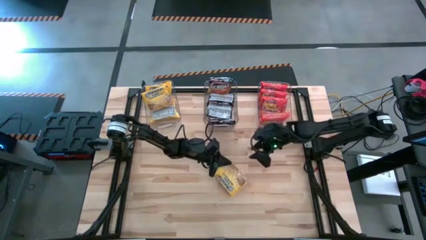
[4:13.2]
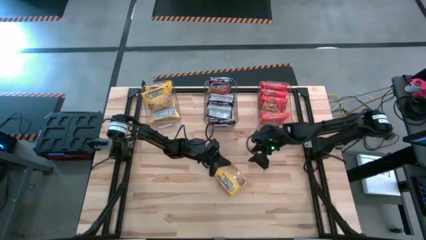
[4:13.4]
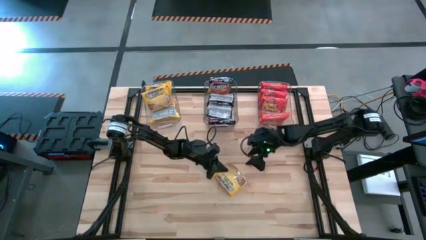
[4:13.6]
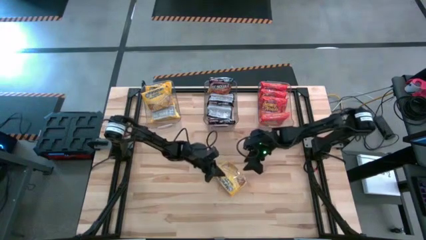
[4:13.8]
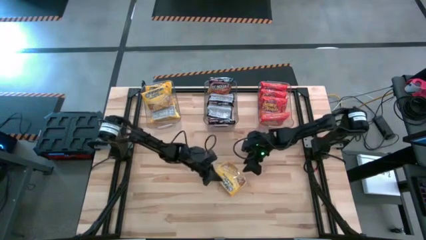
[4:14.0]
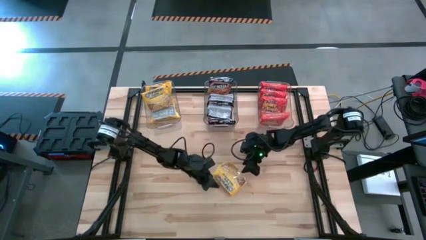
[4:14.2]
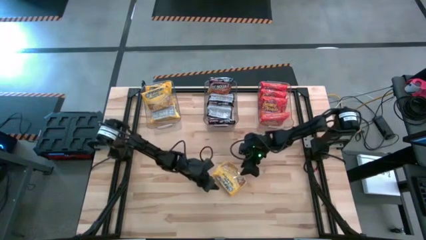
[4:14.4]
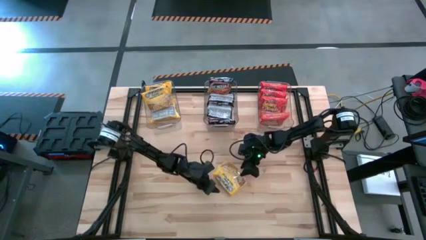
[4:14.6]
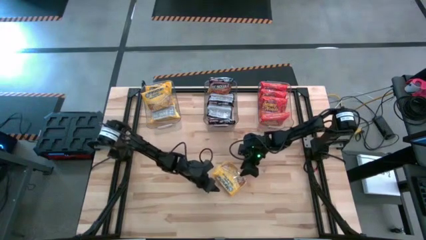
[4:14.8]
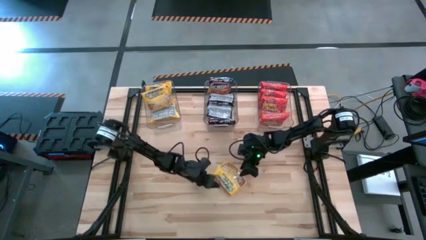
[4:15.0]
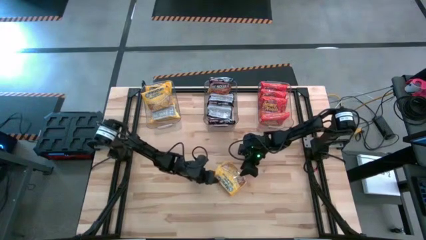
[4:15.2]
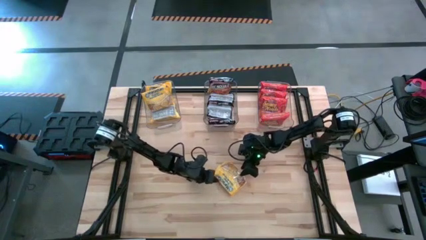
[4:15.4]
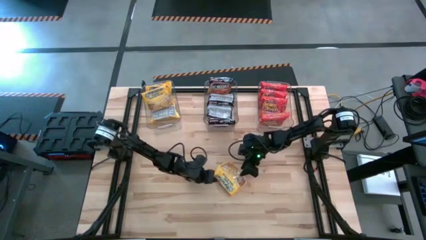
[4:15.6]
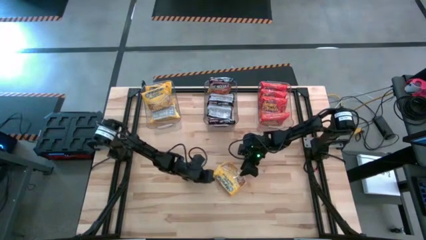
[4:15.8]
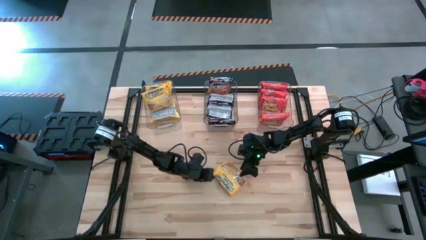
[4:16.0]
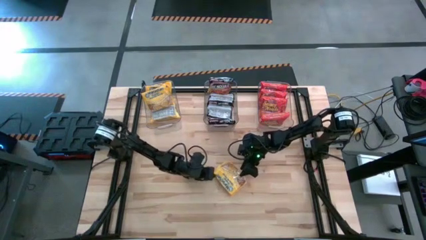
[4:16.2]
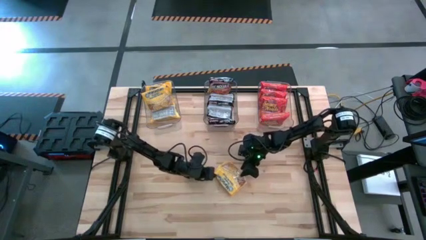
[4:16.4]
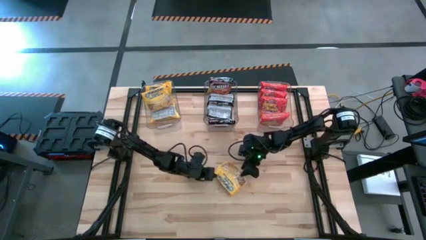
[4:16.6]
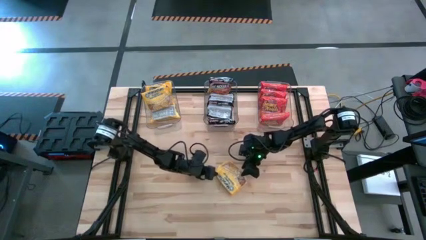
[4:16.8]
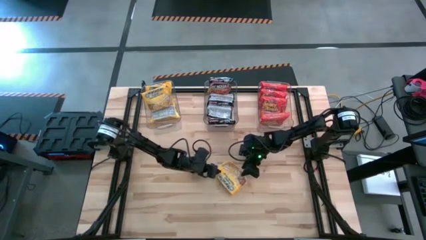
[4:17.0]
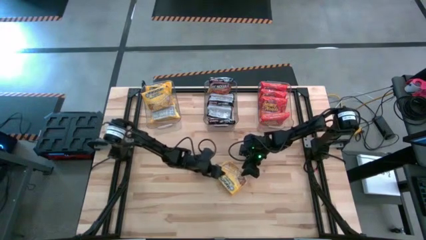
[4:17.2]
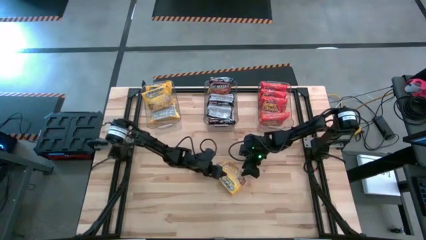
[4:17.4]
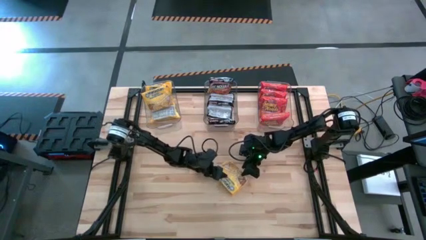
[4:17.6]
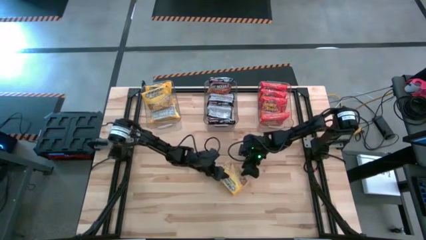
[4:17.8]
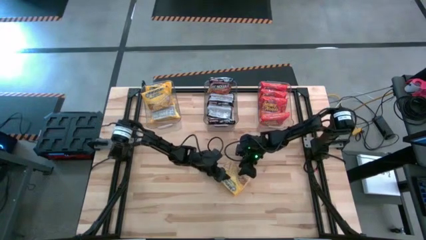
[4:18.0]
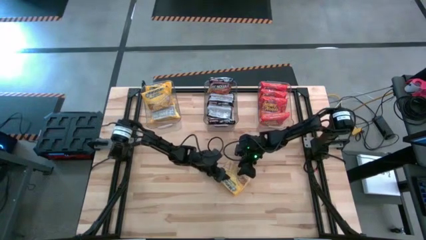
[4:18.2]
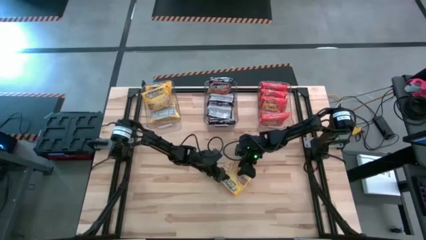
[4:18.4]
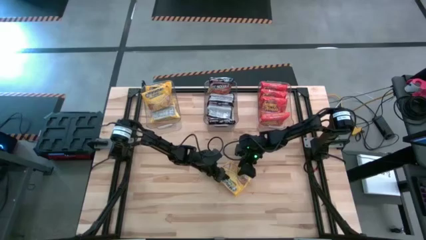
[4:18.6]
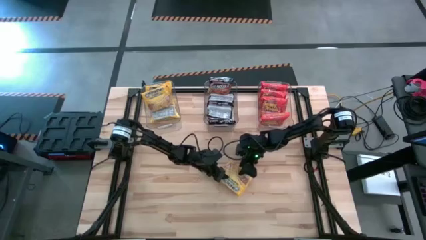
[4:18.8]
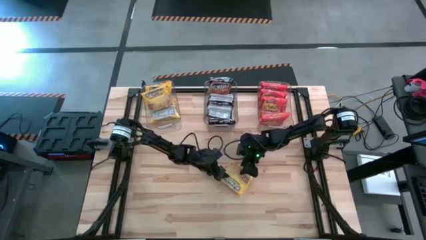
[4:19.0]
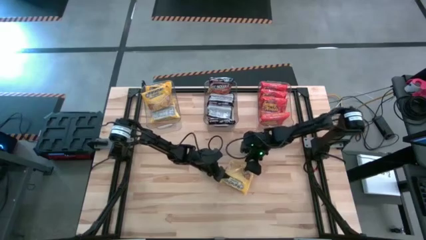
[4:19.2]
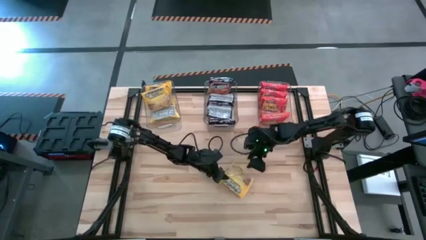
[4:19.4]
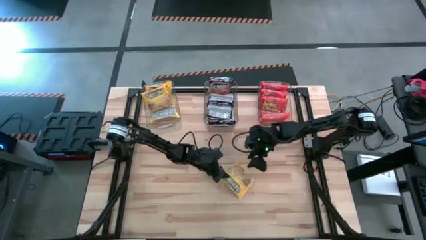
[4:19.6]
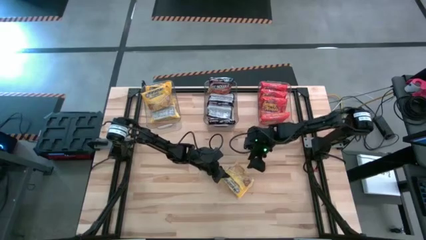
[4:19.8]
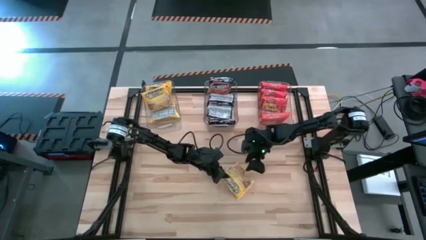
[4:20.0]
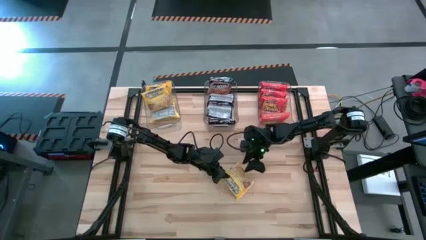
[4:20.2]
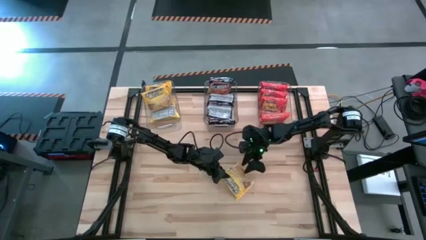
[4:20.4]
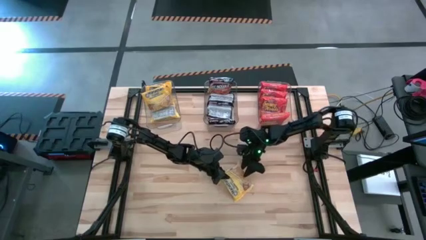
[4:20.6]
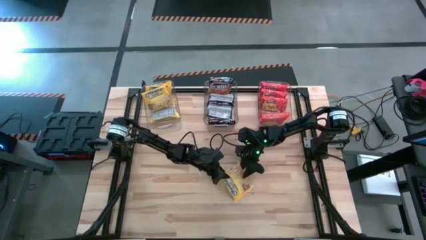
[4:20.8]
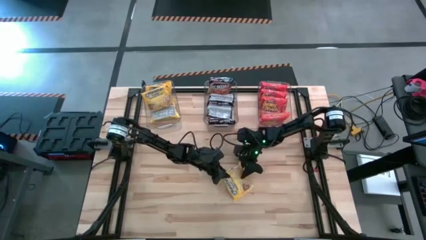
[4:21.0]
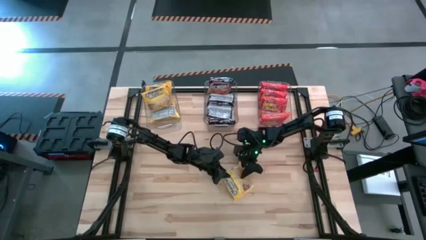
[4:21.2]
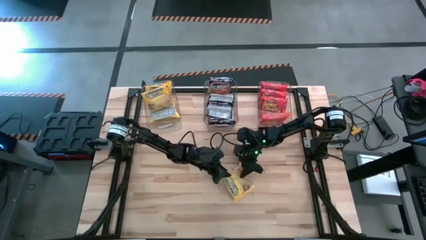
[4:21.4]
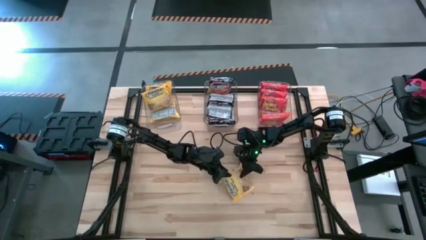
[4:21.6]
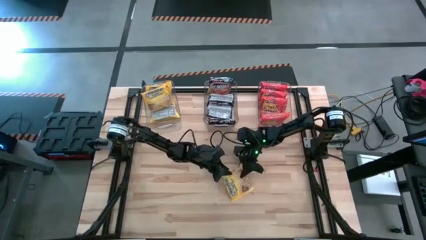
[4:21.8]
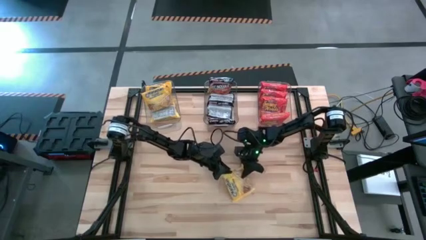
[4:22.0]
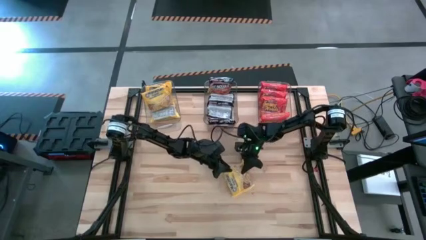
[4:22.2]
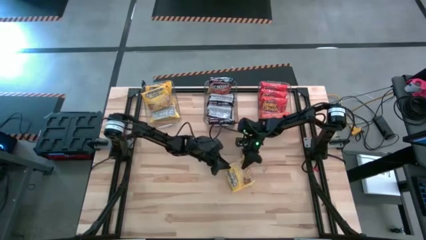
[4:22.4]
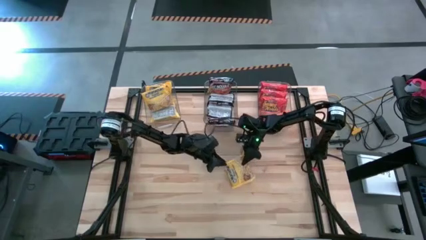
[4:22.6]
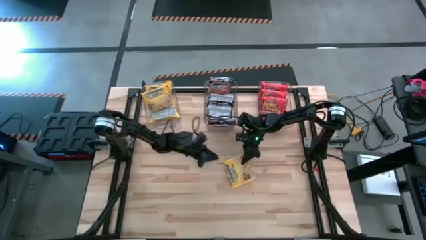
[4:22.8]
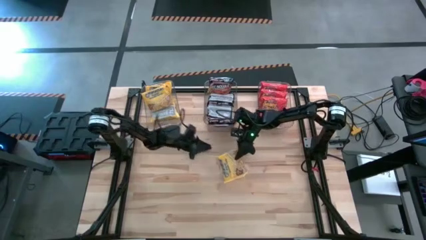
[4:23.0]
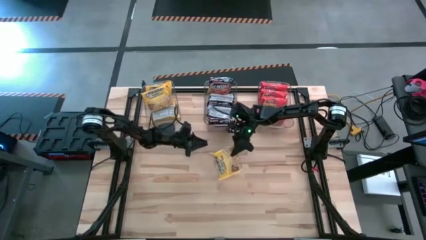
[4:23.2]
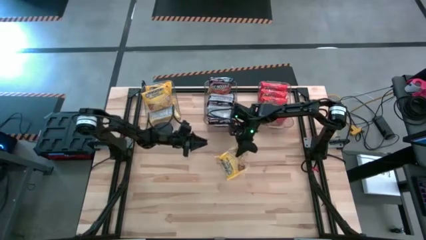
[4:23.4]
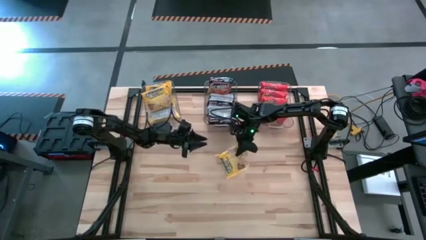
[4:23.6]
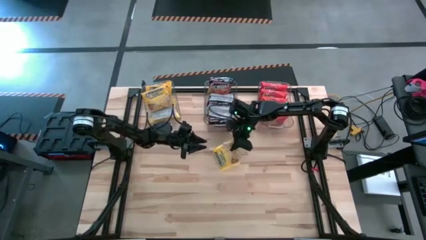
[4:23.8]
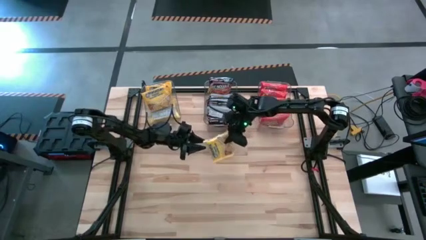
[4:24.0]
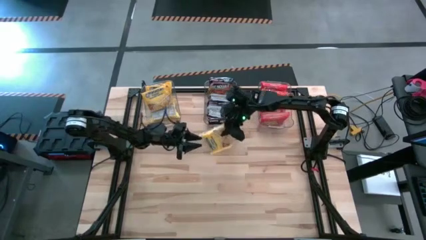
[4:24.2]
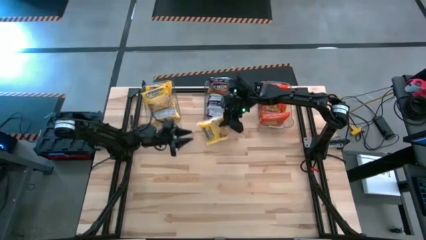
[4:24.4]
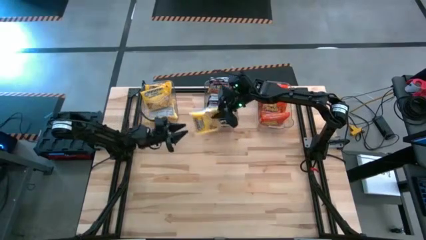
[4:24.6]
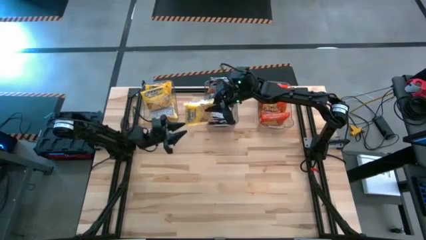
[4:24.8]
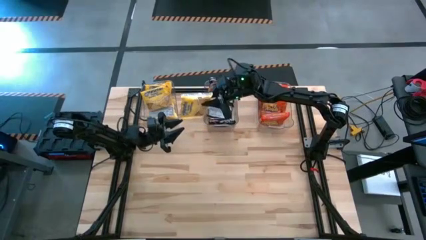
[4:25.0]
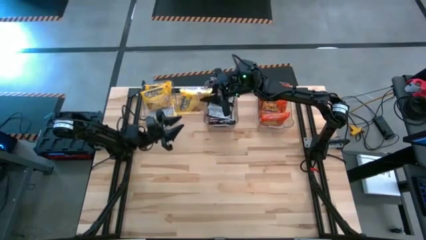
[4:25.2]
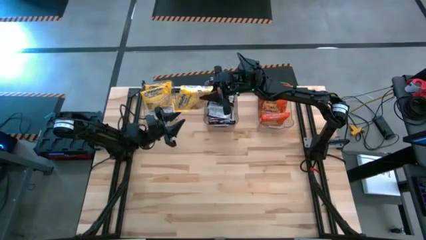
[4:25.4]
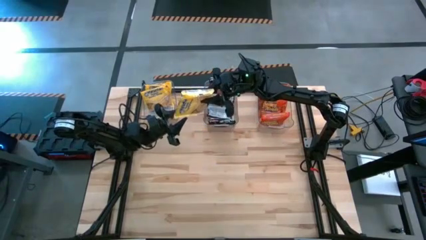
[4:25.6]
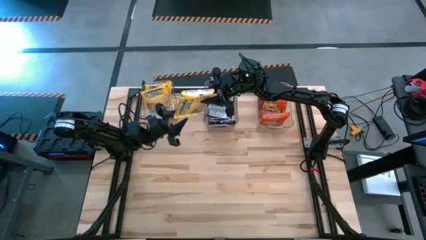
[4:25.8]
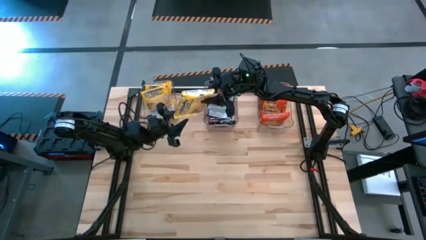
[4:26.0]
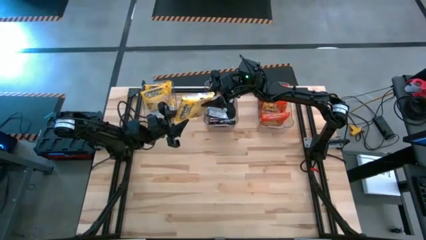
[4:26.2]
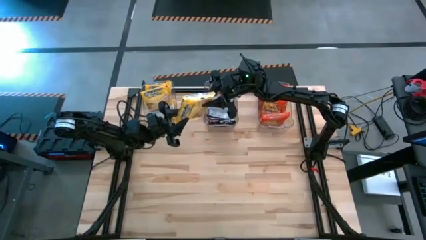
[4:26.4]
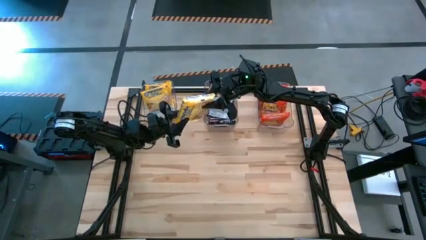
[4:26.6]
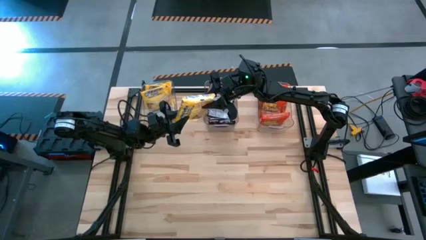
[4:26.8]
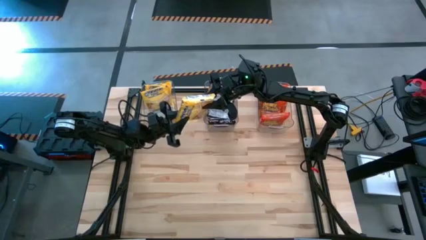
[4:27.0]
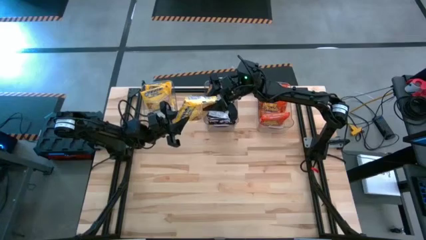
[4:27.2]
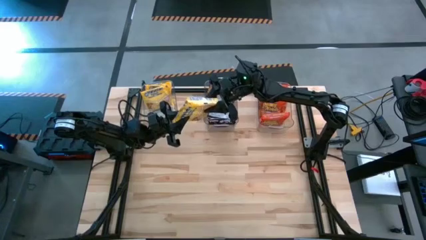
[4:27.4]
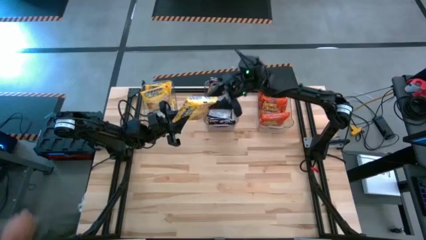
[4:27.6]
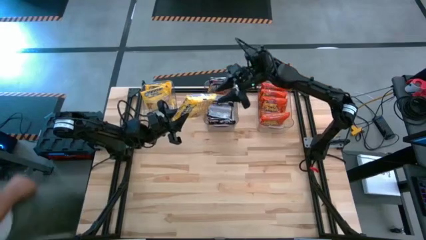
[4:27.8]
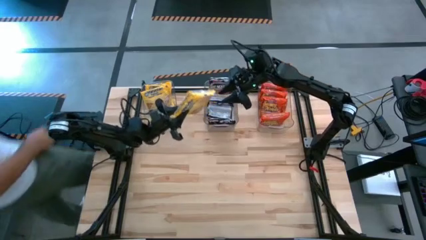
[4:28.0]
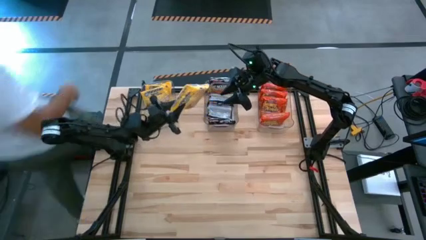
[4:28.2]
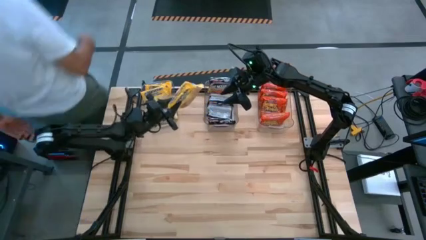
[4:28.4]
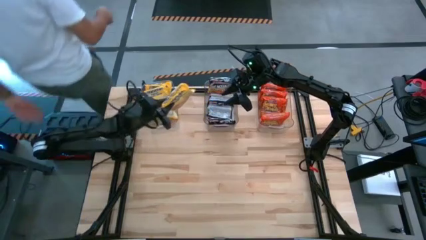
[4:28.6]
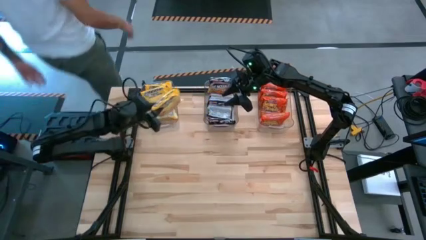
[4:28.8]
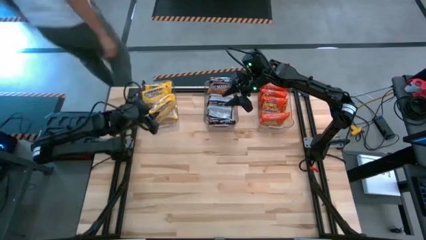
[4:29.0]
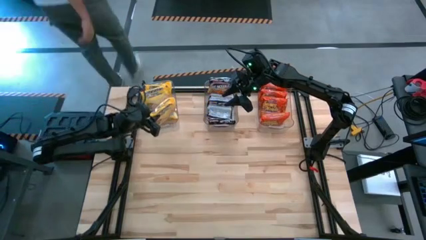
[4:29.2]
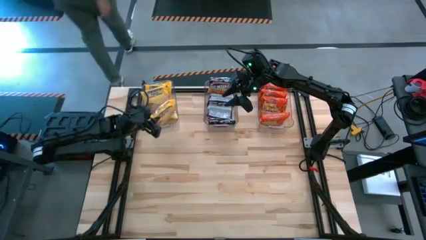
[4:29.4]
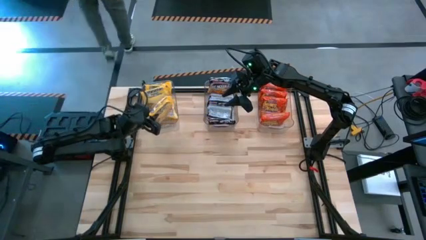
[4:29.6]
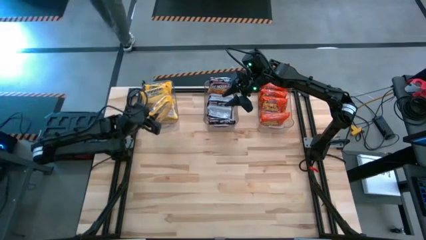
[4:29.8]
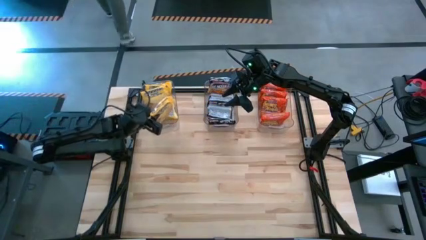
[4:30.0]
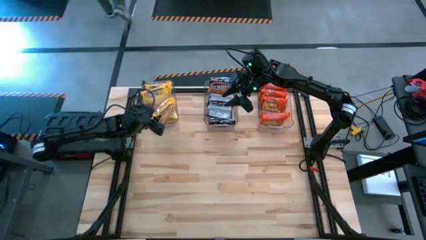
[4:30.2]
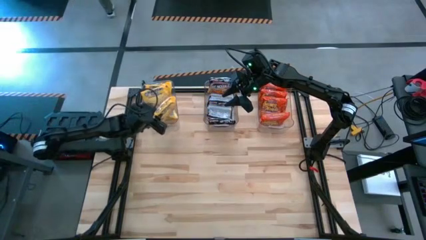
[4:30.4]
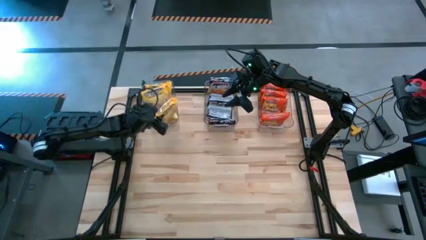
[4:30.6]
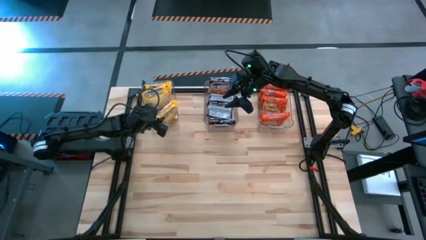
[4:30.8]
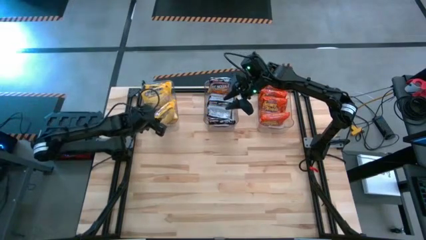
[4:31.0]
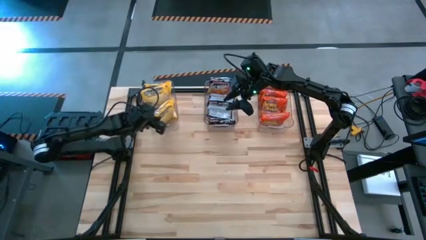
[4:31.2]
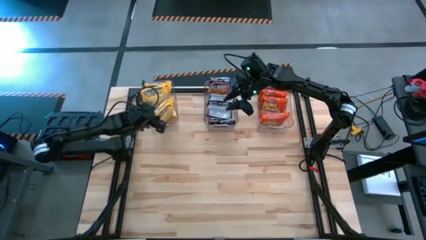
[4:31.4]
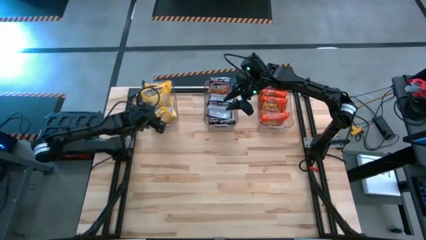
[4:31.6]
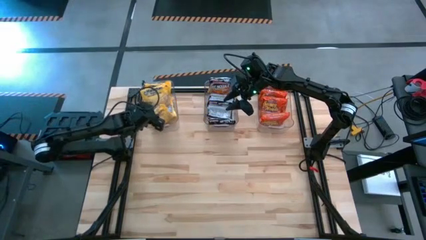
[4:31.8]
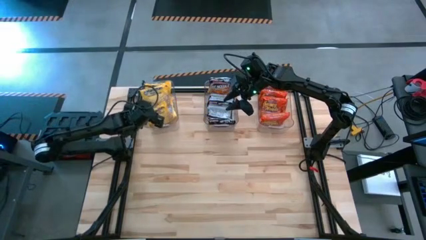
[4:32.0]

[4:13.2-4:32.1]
Task: Sort Maruchan noodles
Put the yellow noodle pack into the left transparent bin
